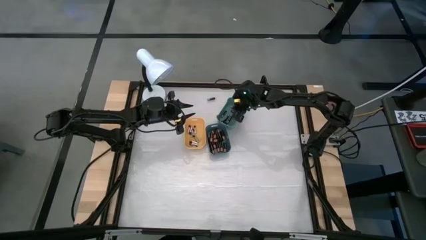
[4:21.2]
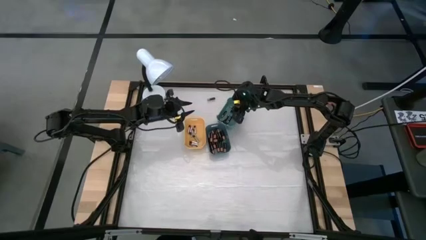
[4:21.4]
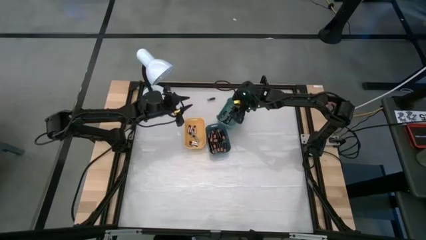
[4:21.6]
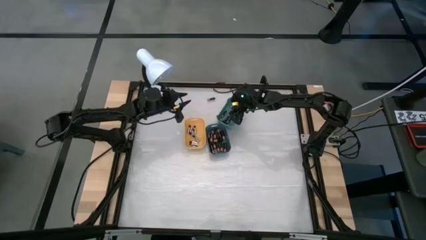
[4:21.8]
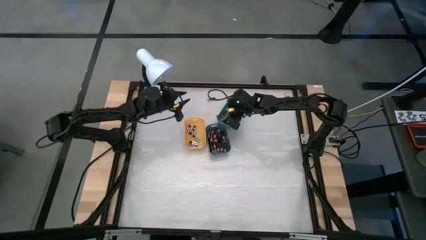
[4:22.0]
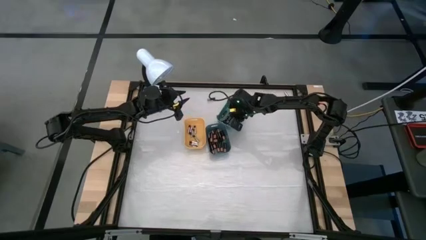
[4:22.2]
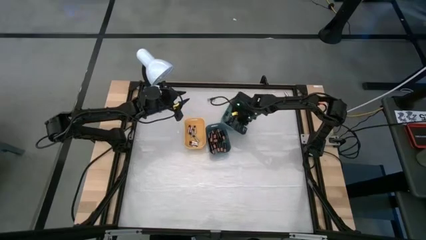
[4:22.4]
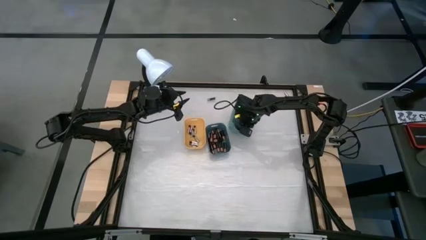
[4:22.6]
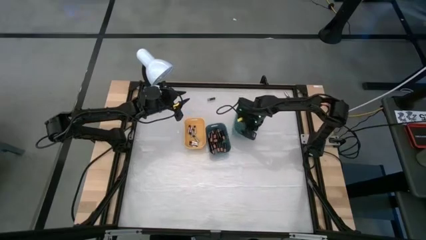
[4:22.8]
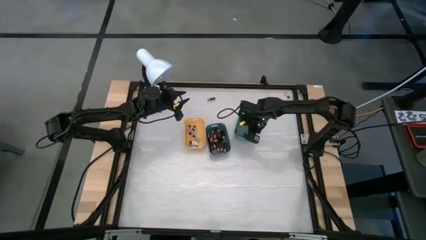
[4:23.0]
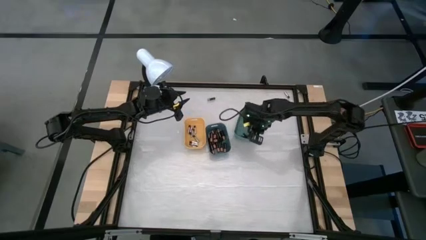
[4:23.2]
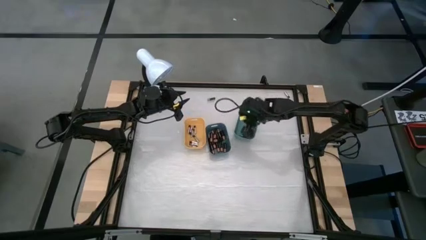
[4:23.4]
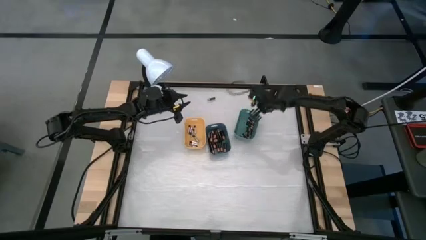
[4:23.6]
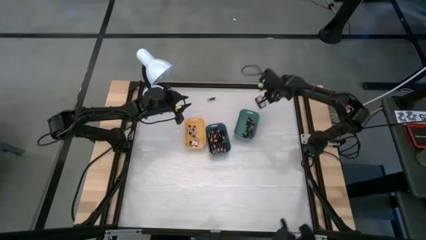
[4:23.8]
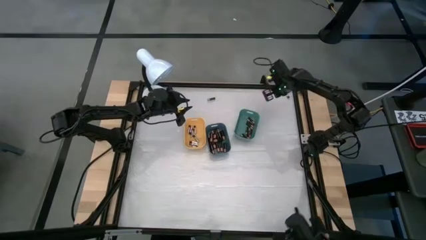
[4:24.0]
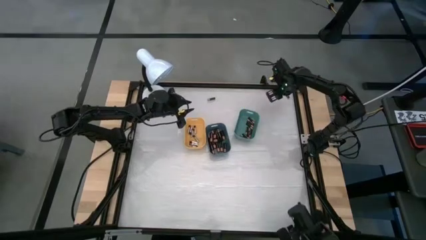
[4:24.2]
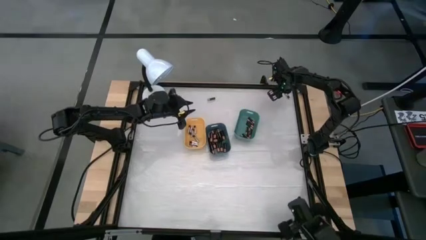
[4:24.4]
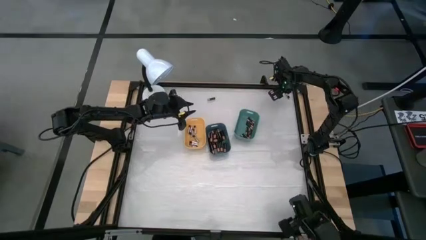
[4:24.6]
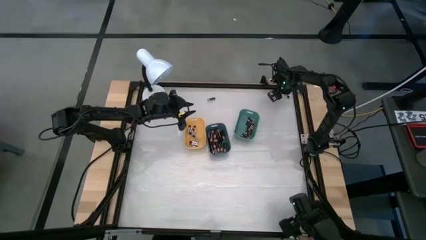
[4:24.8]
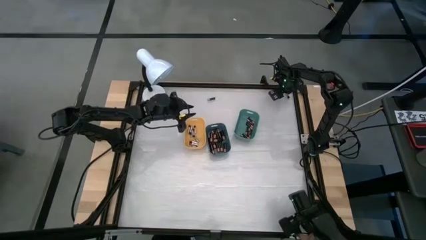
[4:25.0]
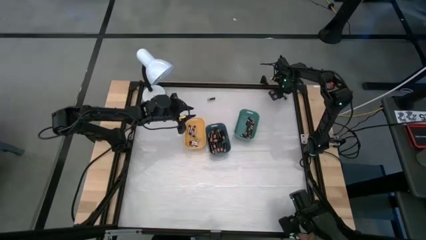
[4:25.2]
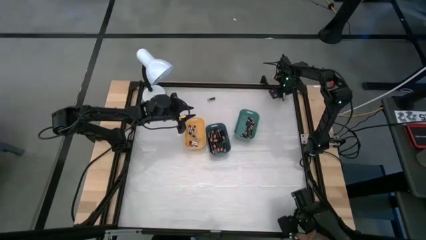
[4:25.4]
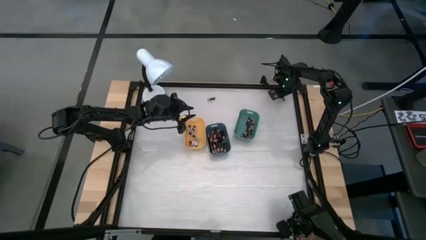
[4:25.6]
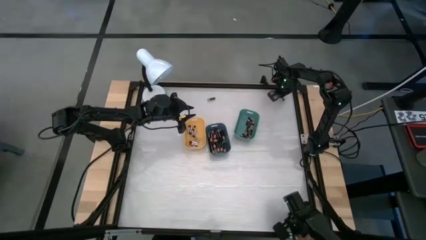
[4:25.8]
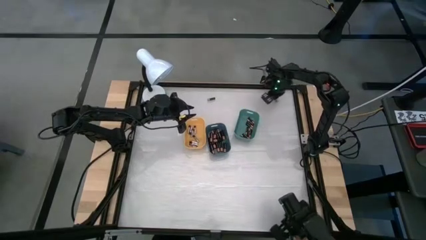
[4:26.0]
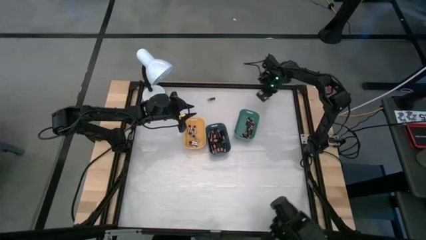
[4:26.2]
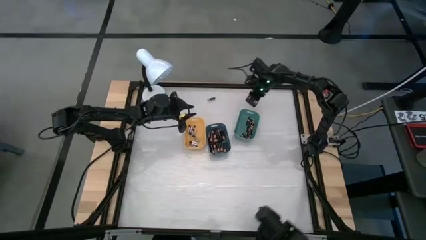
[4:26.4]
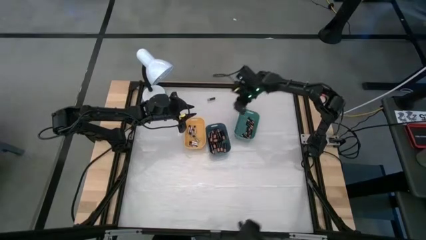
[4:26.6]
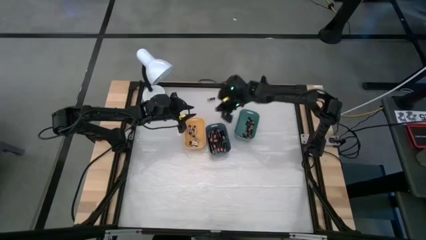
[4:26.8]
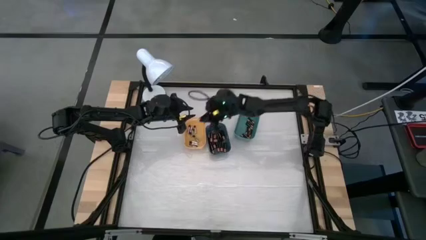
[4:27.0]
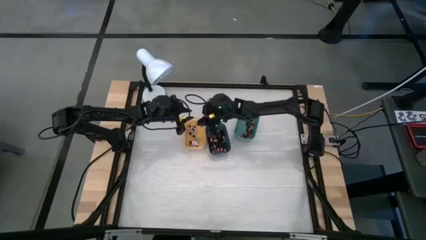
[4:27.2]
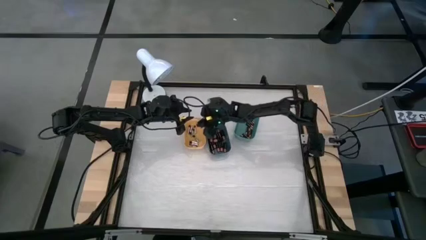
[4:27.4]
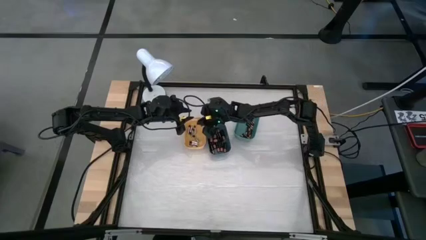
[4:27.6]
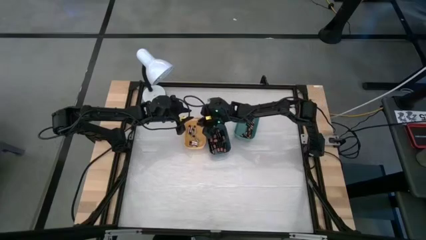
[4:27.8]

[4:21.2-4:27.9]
Task: Sort batteries
Put the silver battery into the yellow bin

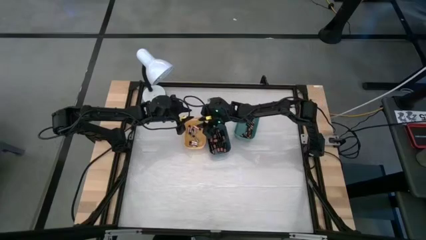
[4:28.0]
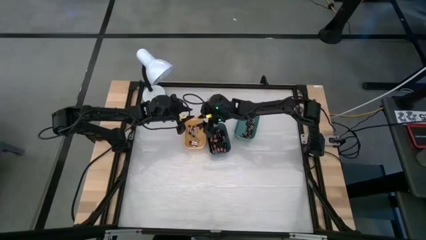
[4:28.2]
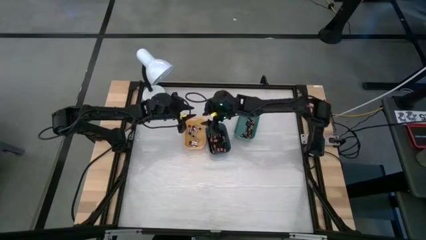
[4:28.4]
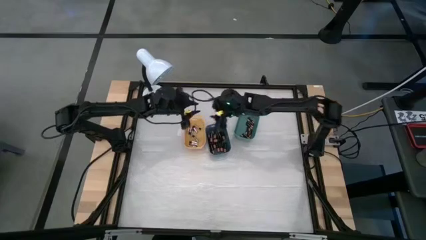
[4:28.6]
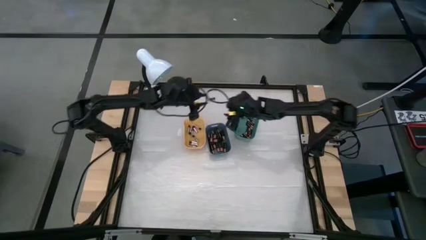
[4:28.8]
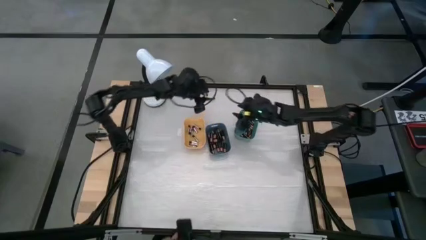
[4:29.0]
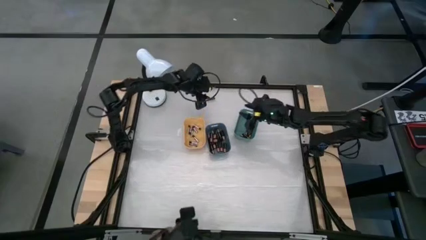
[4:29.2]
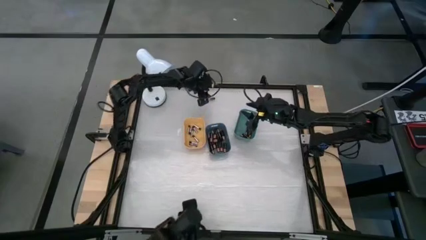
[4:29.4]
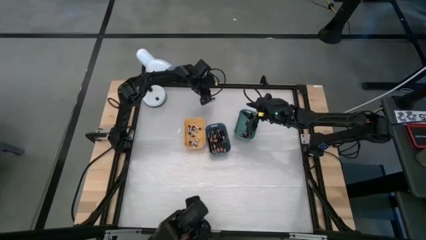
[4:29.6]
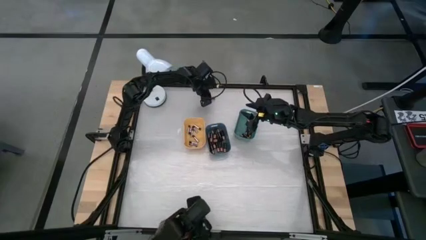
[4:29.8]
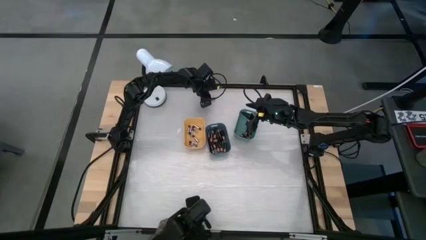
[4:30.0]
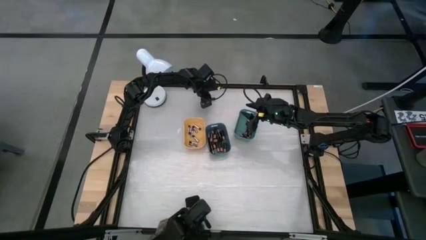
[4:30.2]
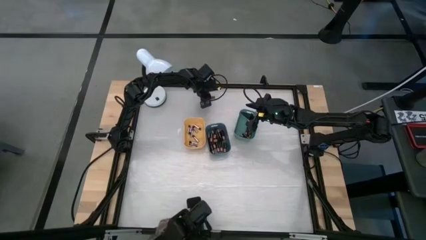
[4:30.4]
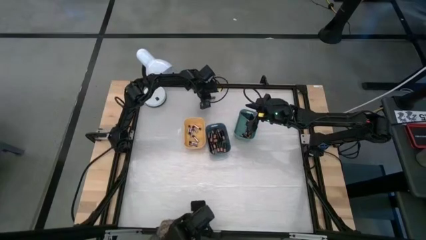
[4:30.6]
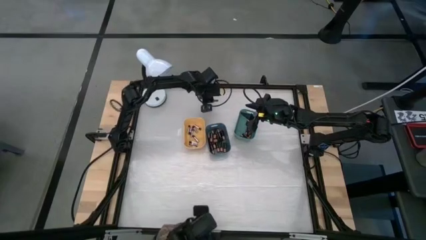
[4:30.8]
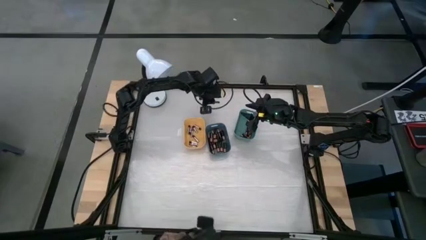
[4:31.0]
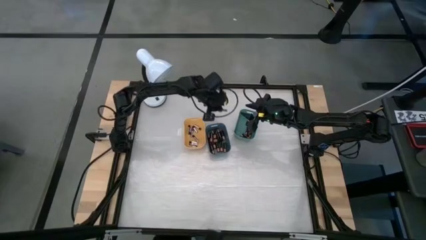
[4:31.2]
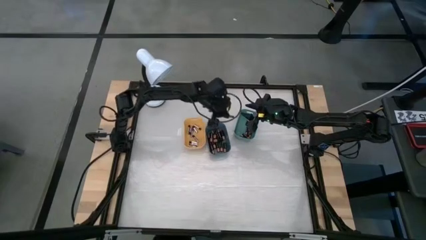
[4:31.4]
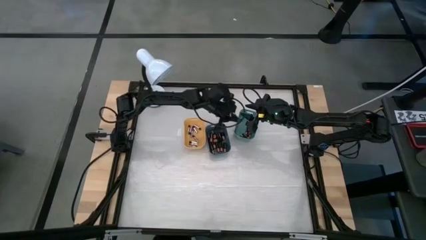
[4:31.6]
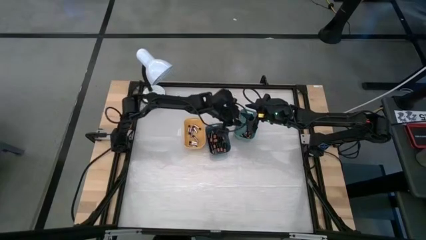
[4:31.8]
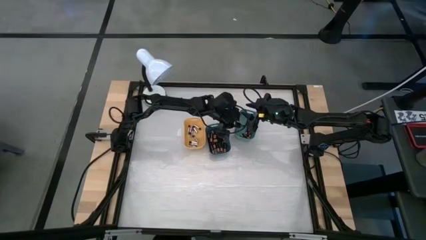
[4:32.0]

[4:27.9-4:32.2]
Put the black battery into the bin

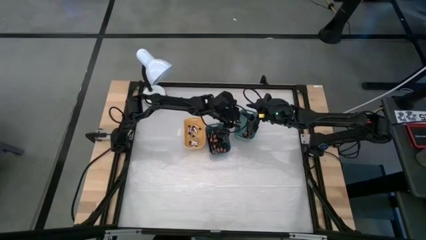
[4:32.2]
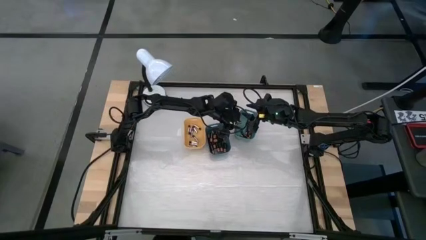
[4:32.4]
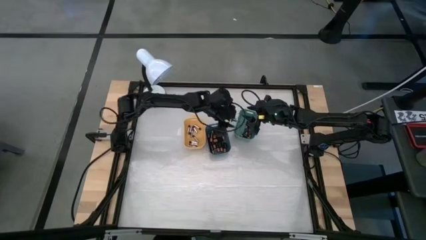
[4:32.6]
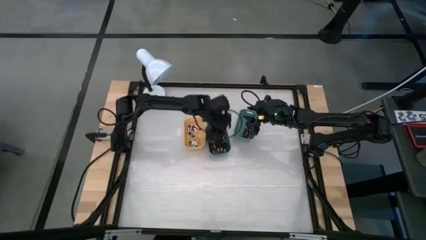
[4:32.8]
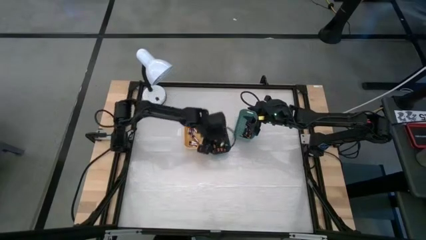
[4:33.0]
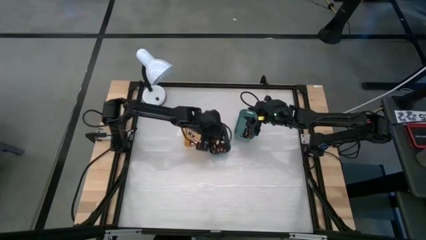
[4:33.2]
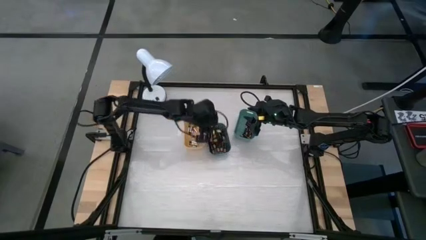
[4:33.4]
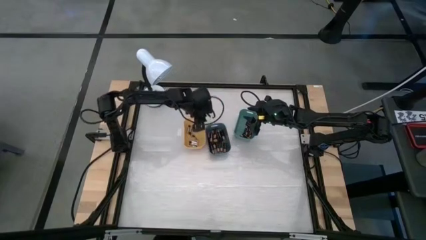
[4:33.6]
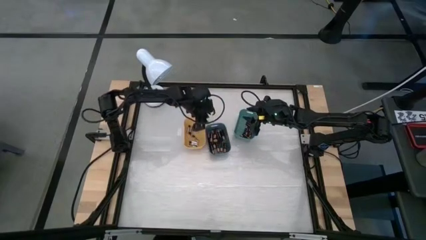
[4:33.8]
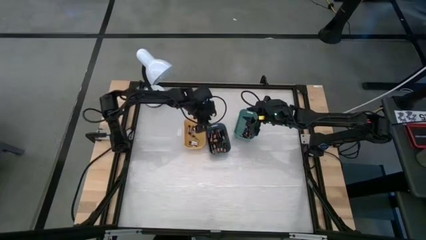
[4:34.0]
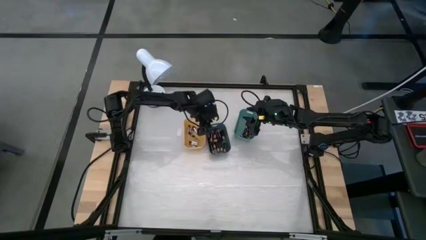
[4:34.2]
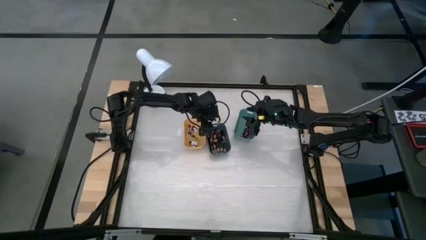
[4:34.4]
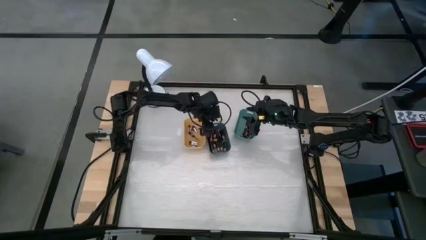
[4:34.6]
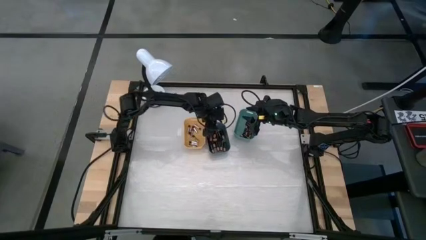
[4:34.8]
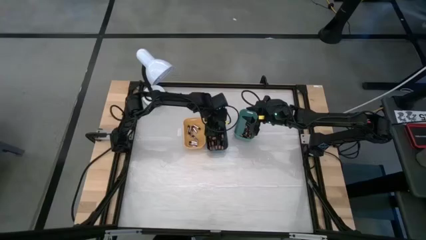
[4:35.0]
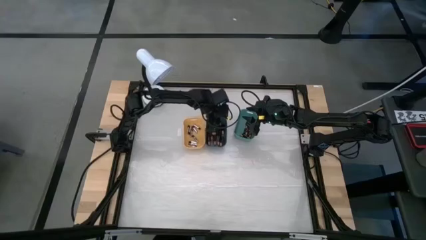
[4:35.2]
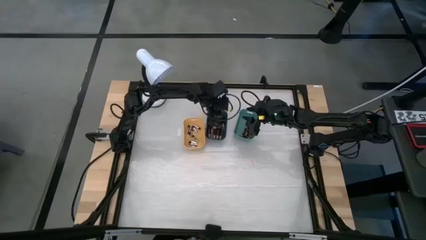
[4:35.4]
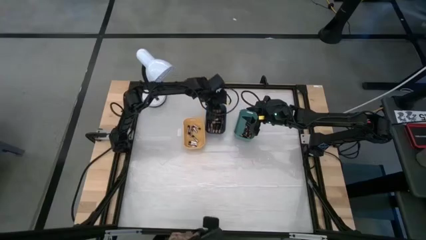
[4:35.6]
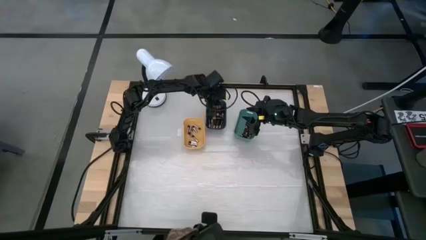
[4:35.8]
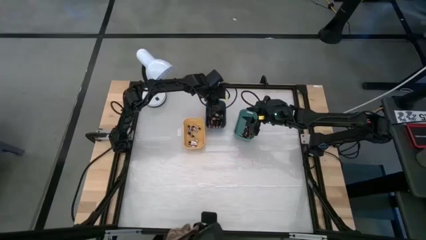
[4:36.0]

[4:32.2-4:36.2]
Adjust the blue bin

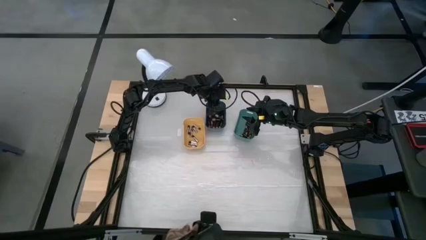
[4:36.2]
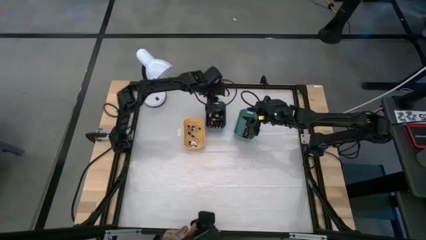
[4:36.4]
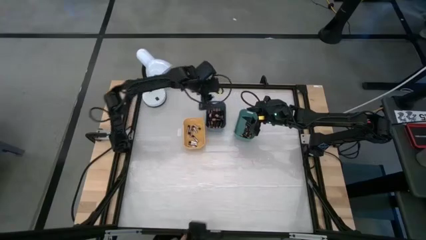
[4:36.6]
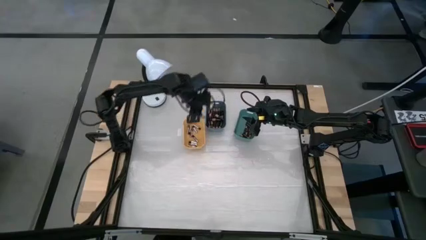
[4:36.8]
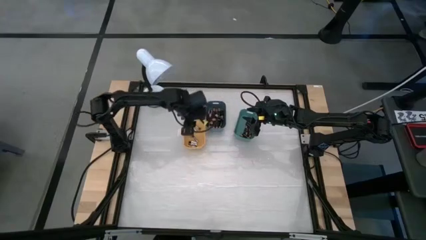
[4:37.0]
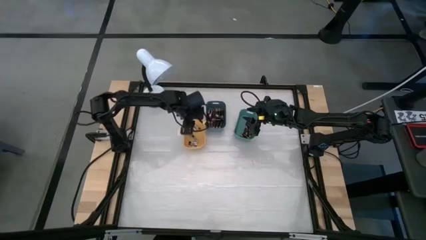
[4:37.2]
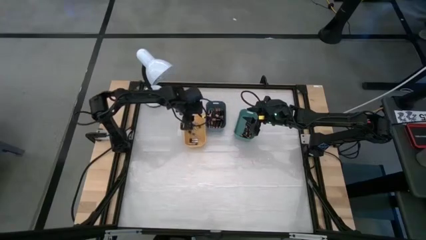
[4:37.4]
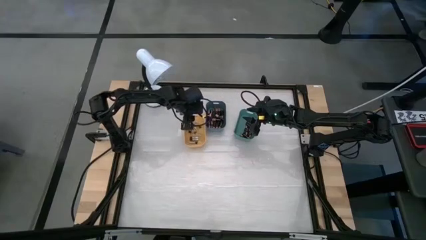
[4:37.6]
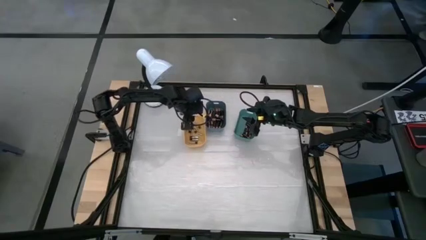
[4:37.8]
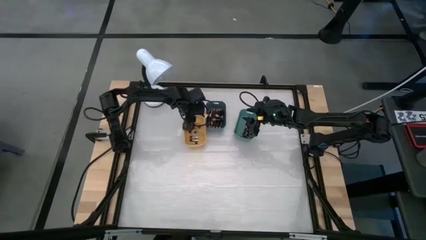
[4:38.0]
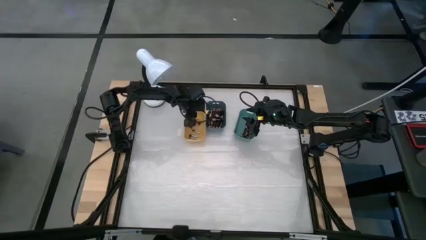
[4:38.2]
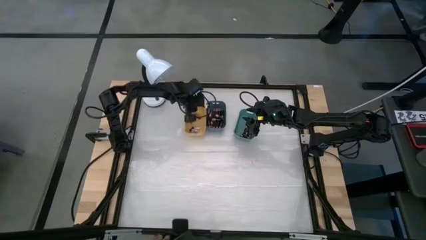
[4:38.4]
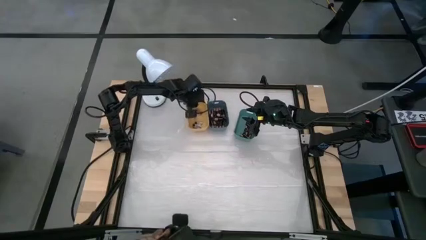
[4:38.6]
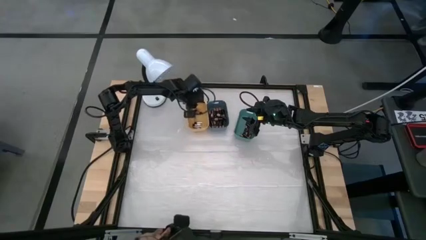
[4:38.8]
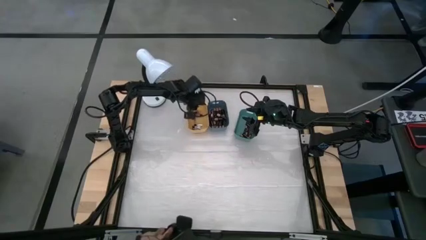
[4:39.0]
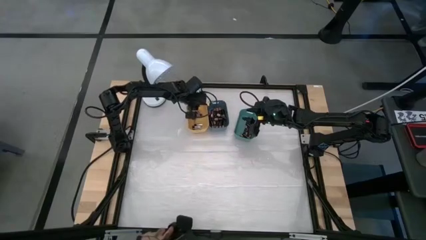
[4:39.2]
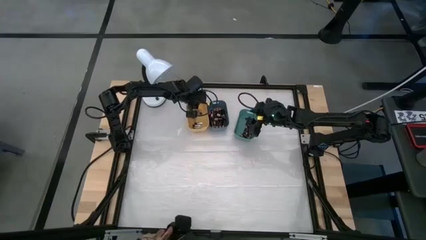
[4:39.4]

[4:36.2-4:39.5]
Adjust the yellow bin
